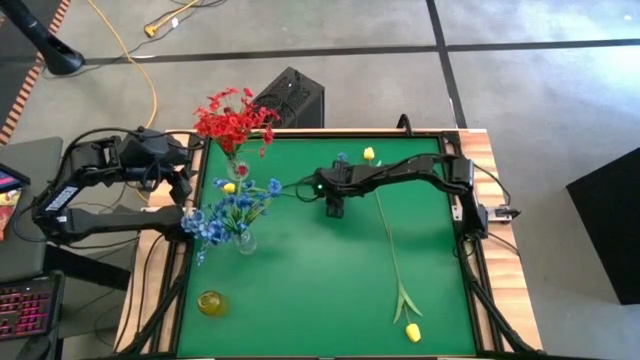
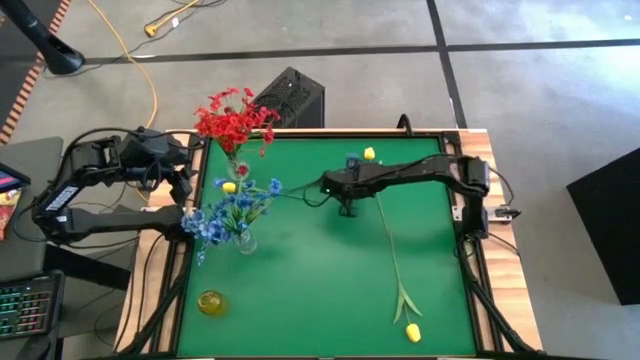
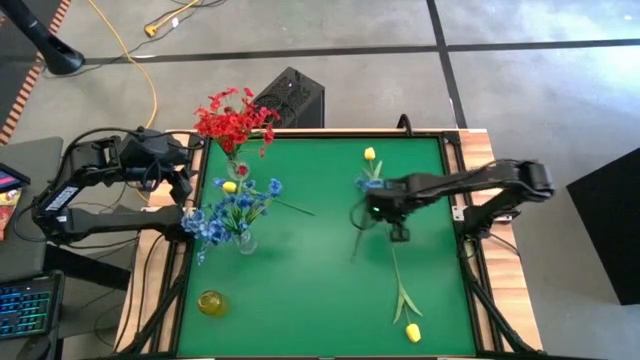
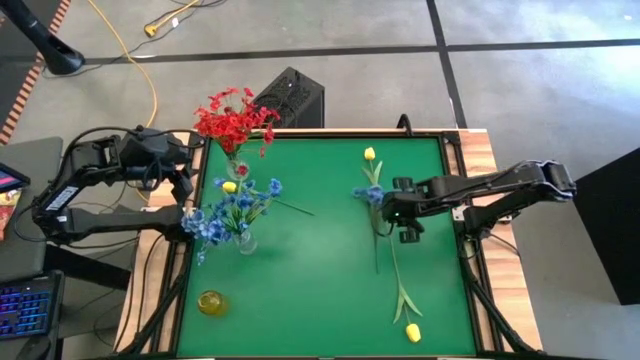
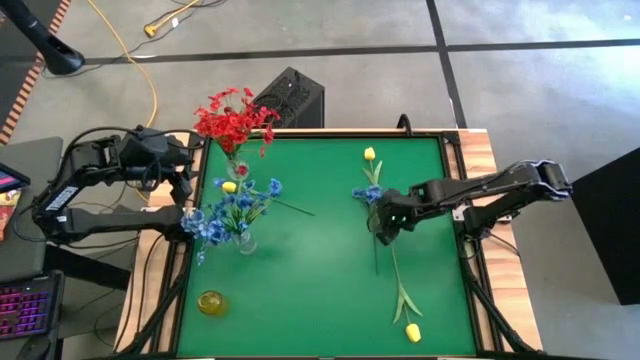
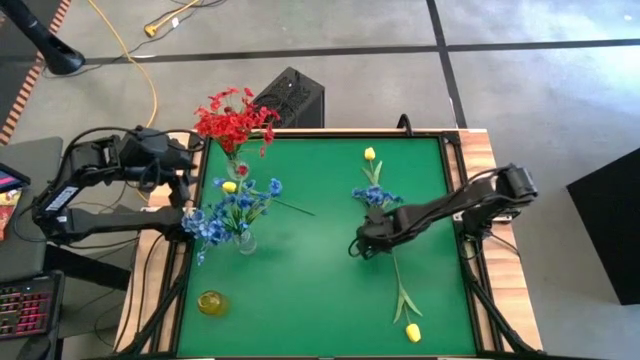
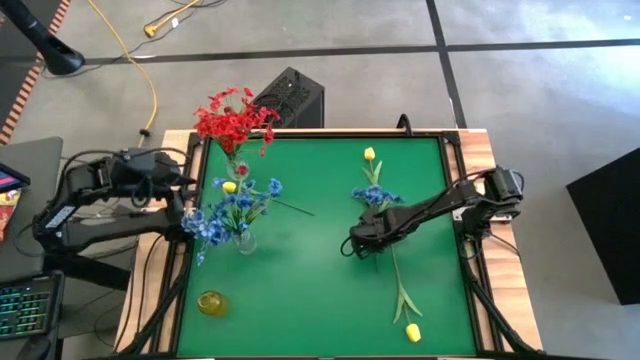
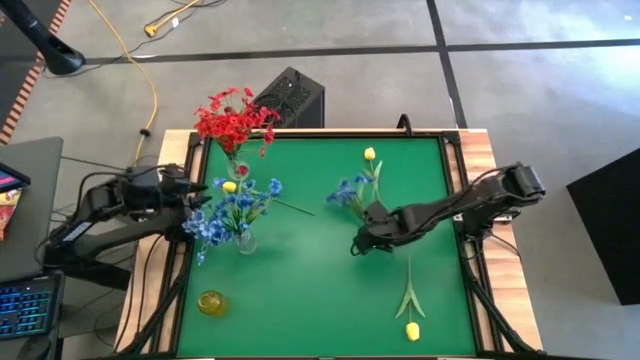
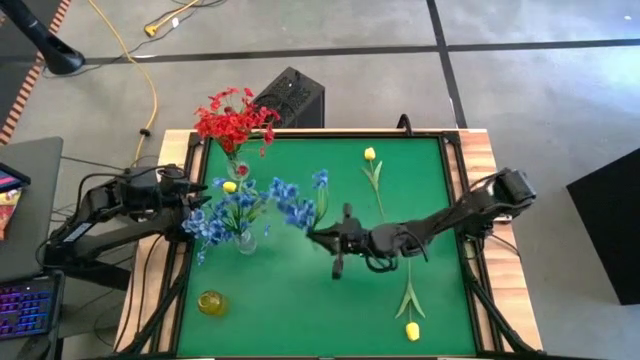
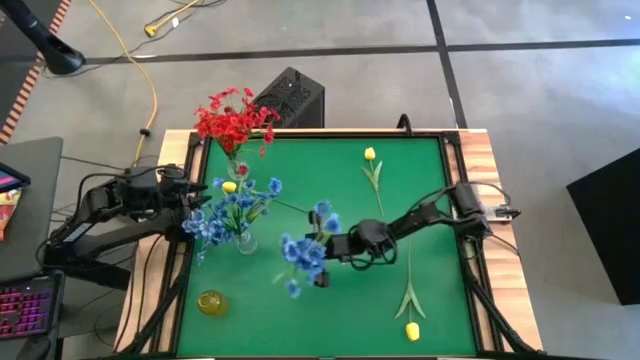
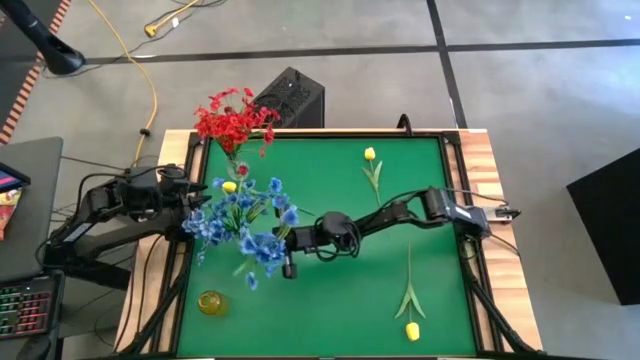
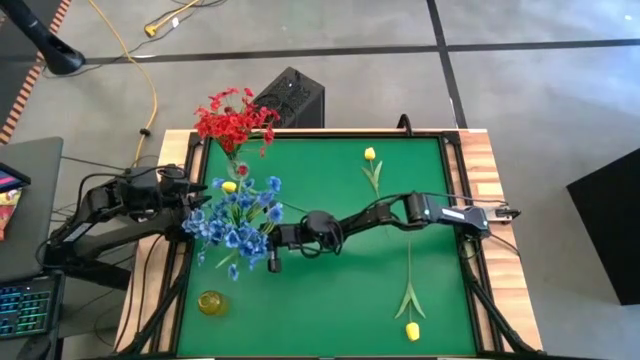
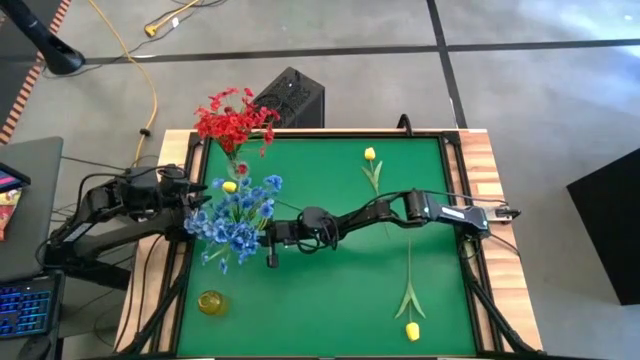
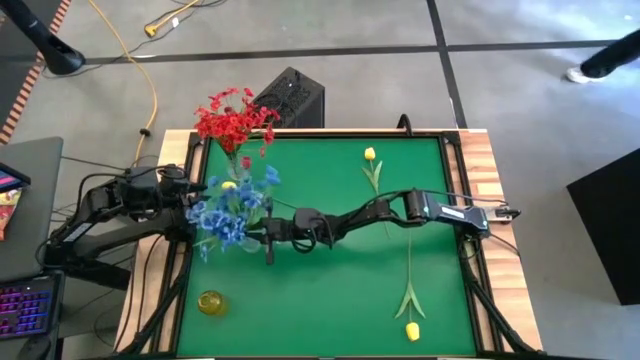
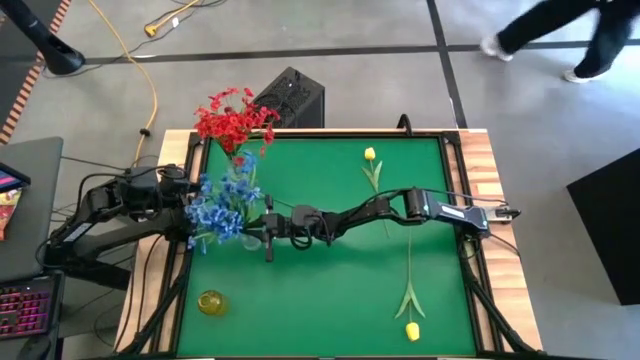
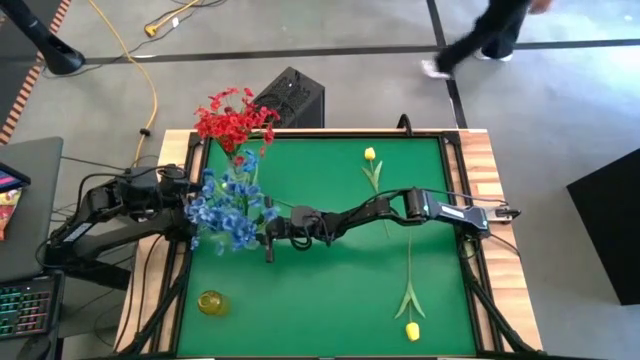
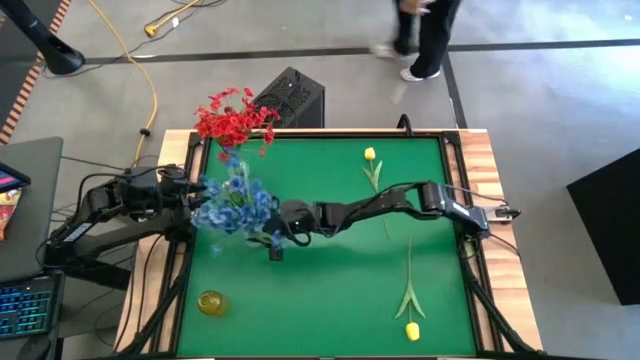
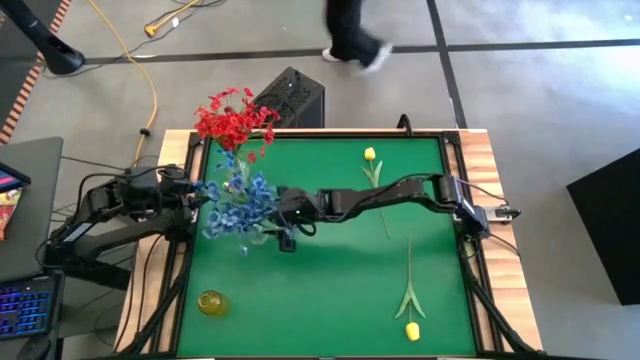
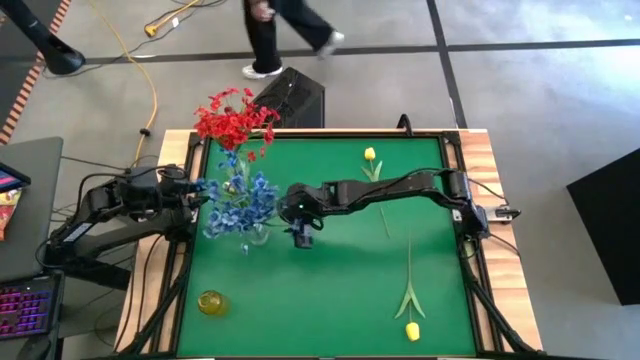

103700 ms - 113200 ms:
Task: Sort flowers into vase by color
Put the blue flowers into the bottom transparent vase

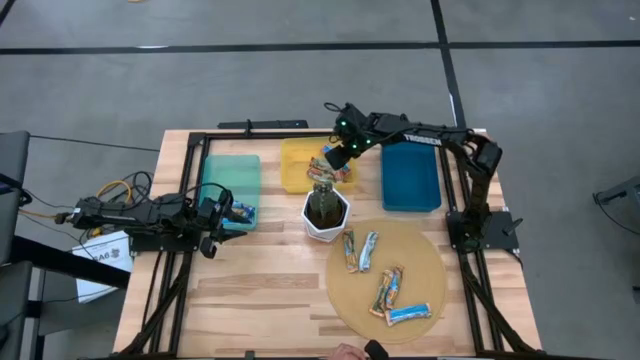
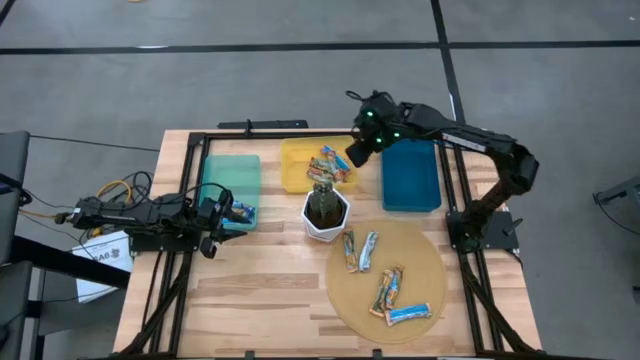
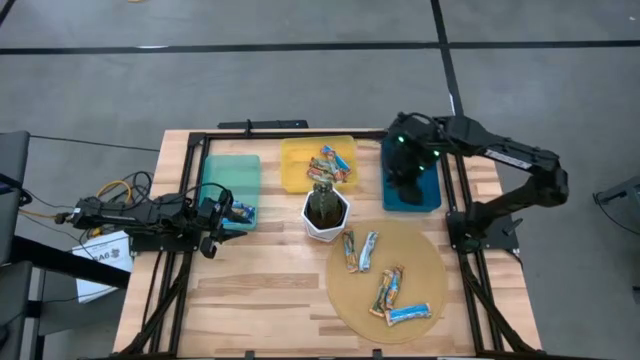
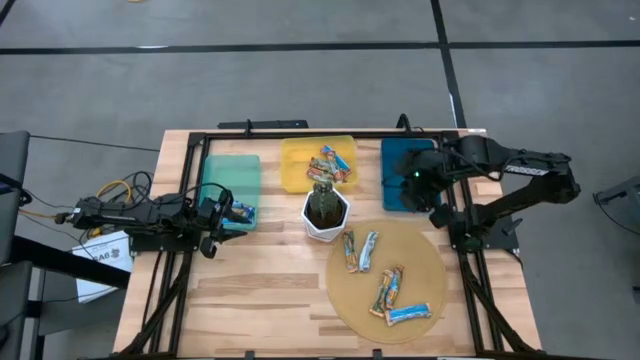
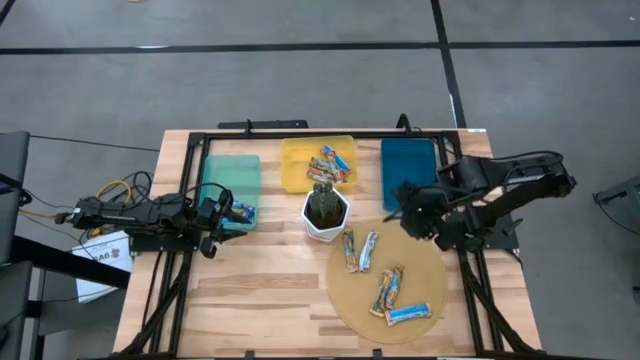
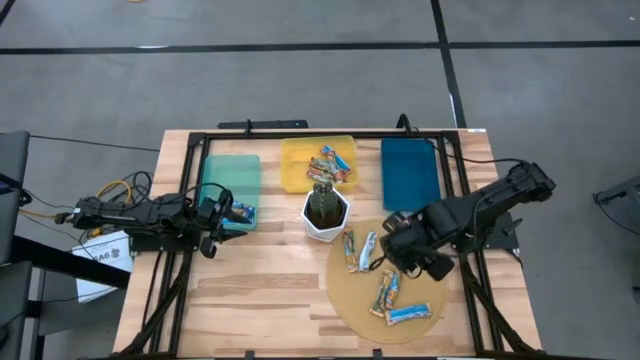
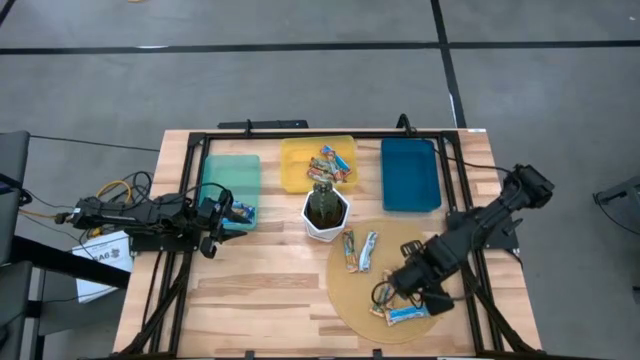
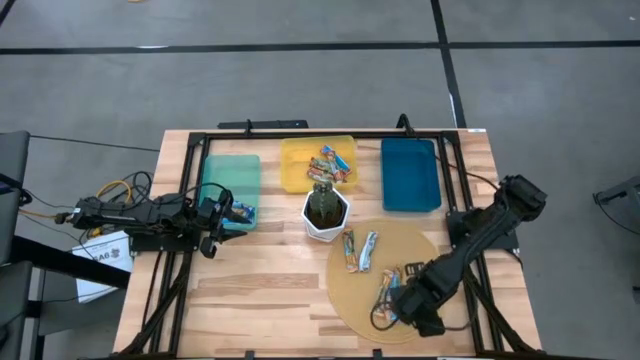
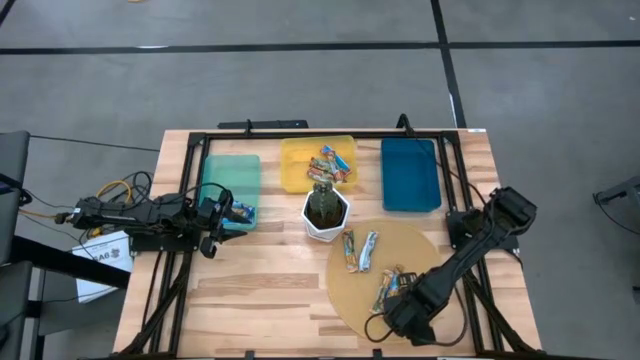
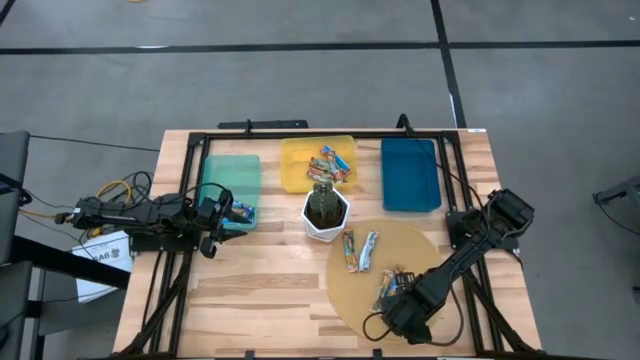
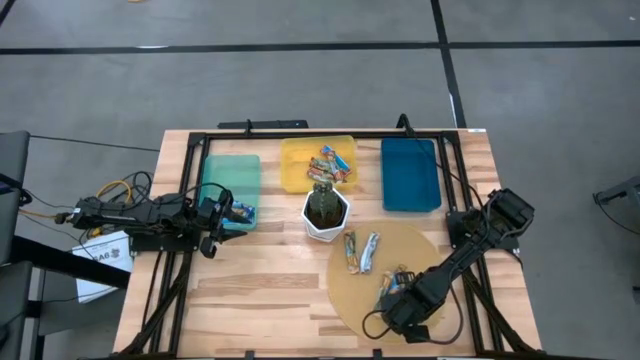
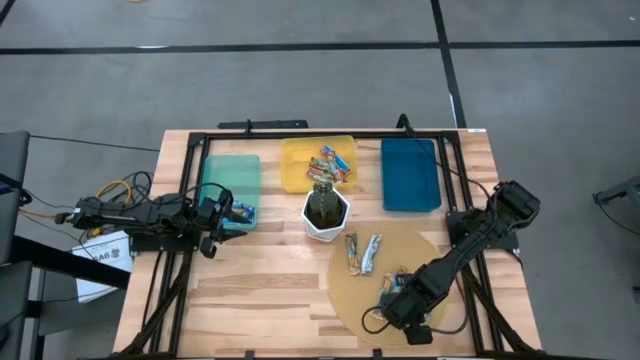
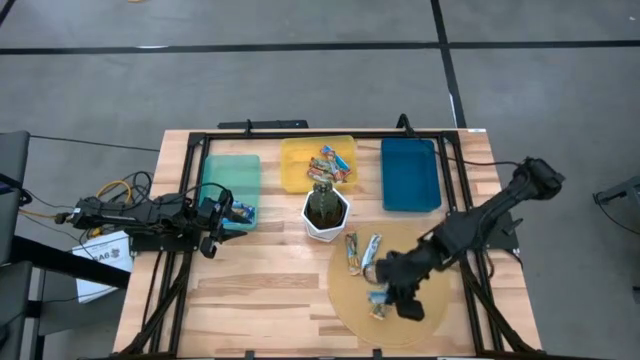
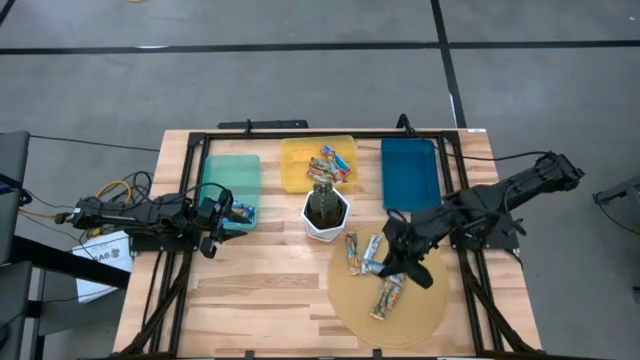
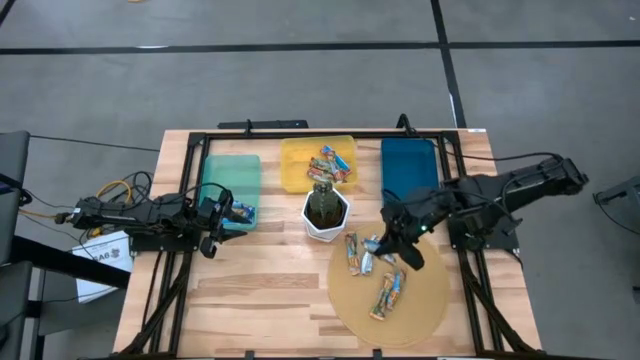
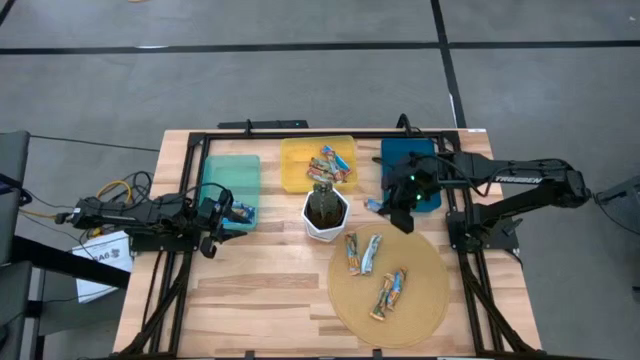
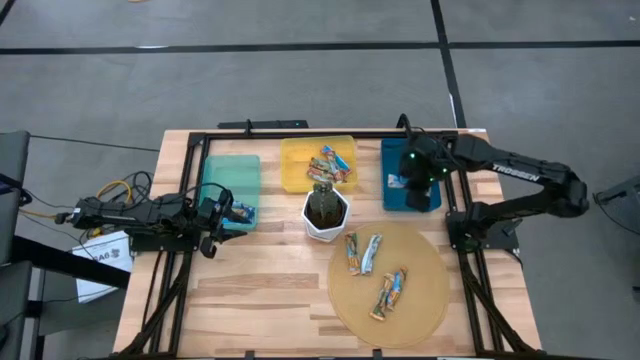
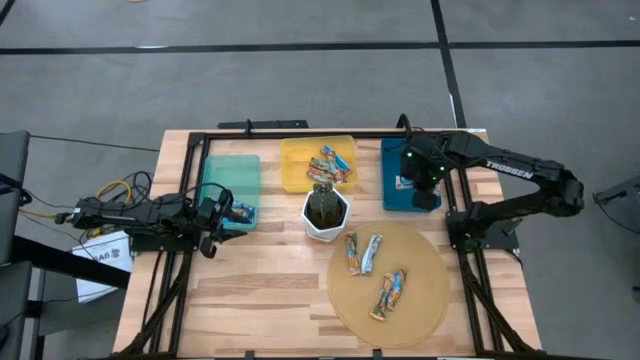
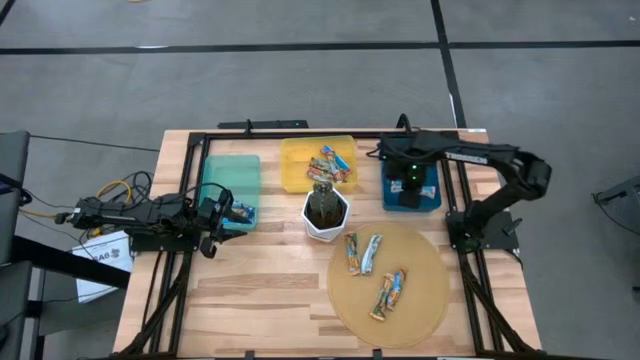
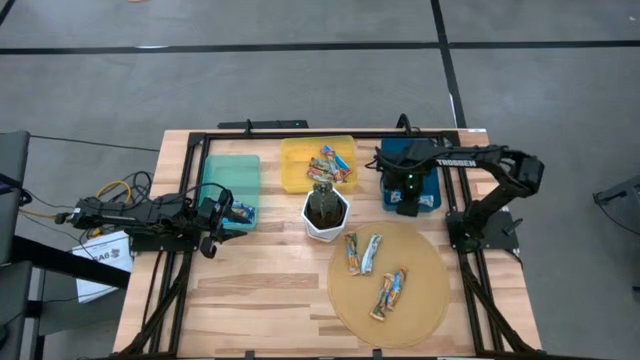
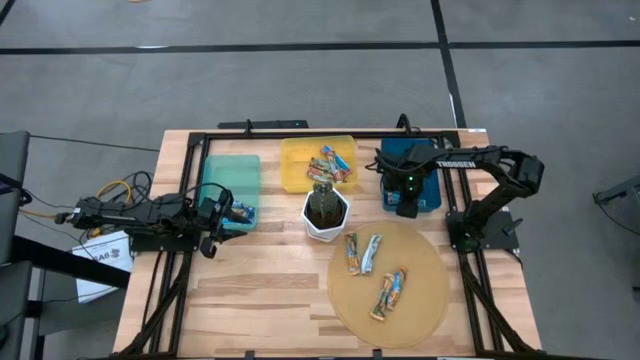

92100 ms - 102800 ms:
Task: Pick and place Granola Bars by type
Put the orange granola bar into the blue bin
